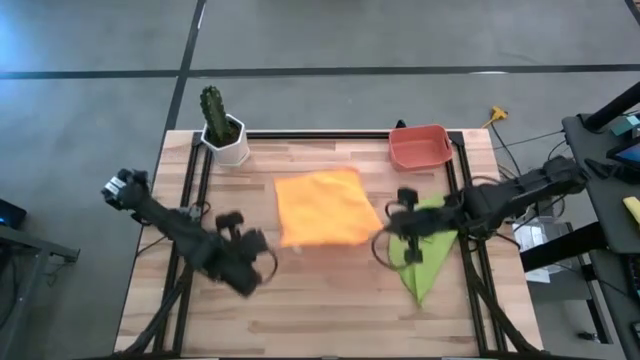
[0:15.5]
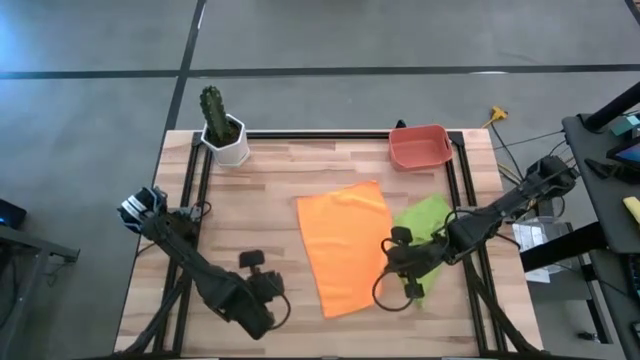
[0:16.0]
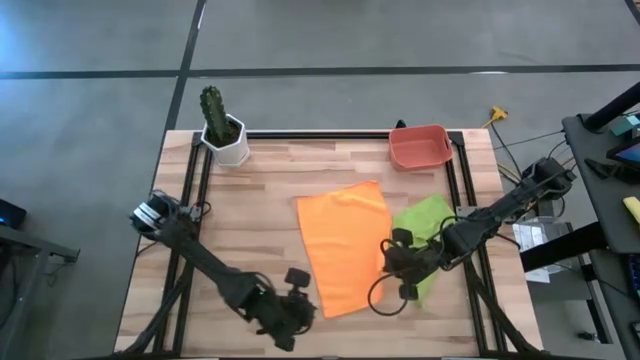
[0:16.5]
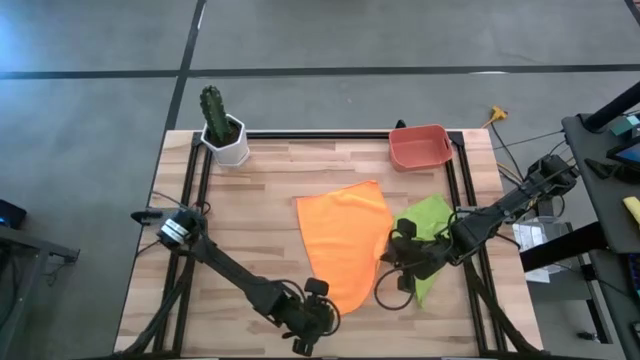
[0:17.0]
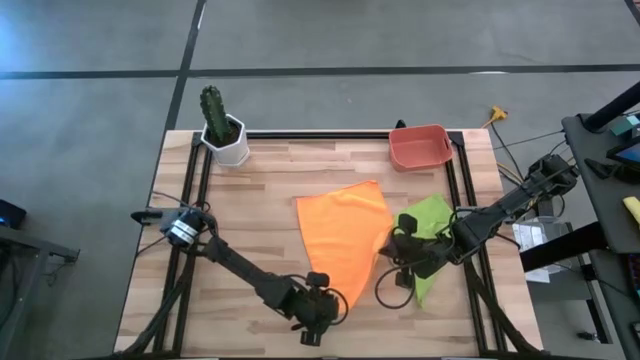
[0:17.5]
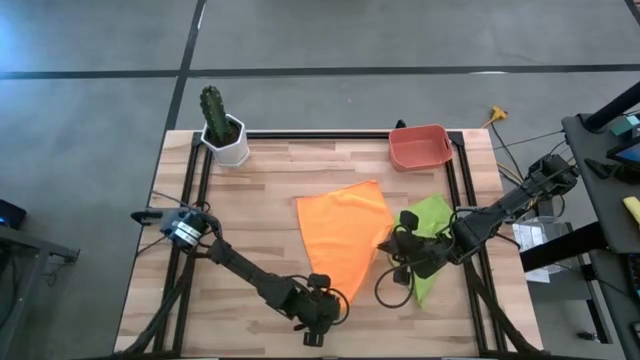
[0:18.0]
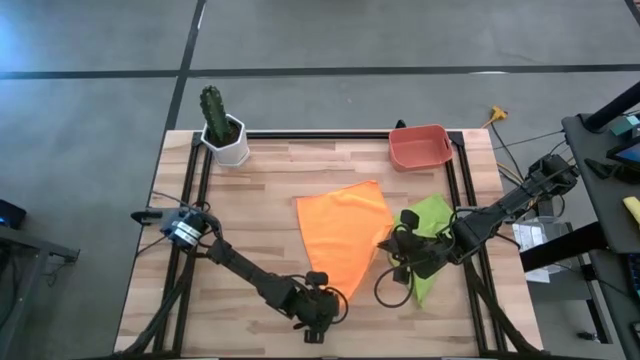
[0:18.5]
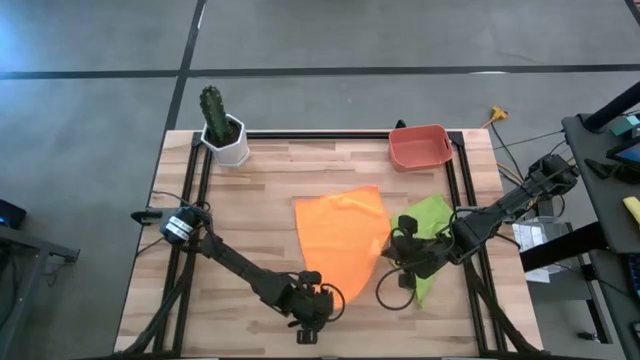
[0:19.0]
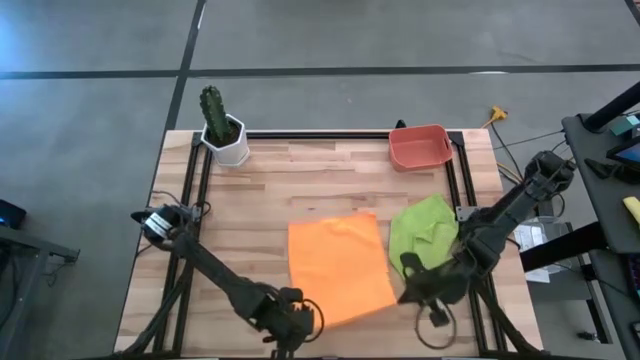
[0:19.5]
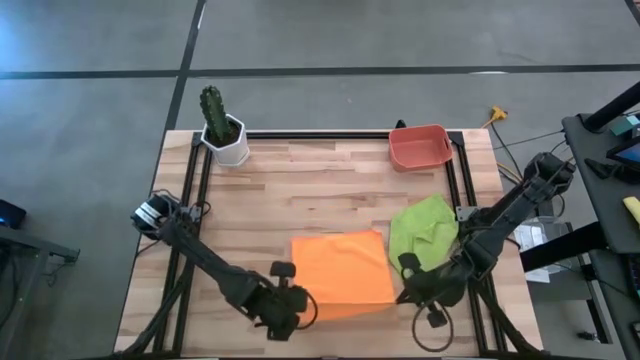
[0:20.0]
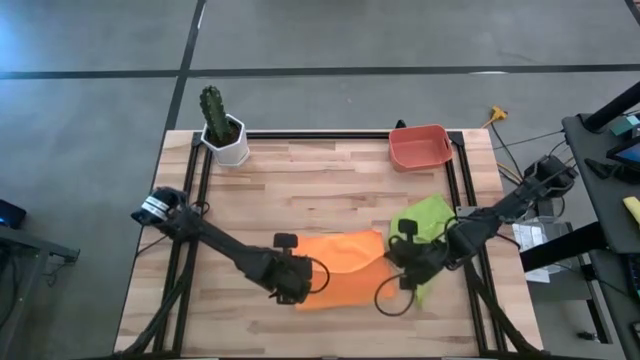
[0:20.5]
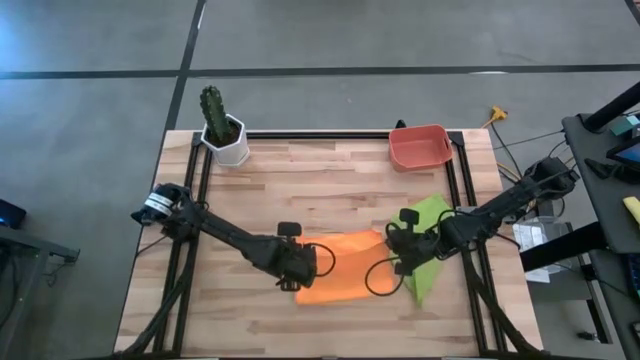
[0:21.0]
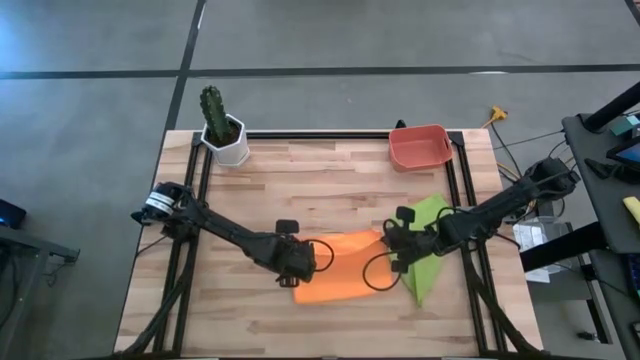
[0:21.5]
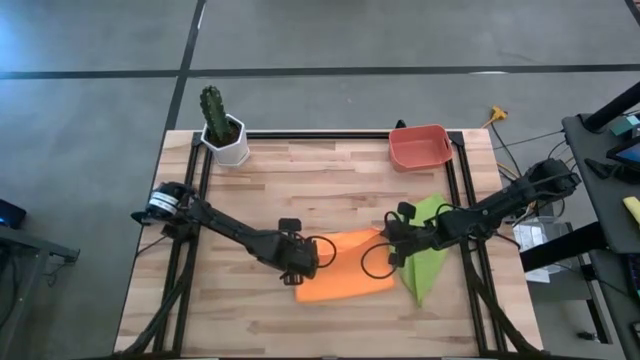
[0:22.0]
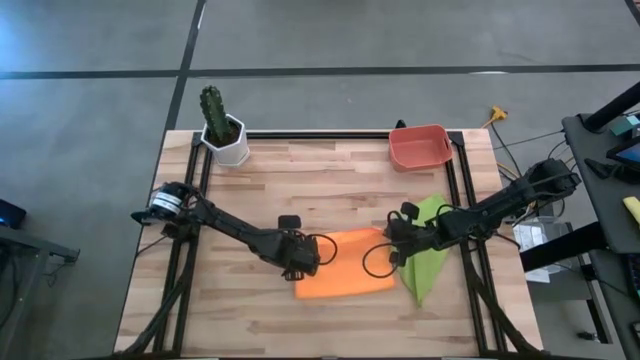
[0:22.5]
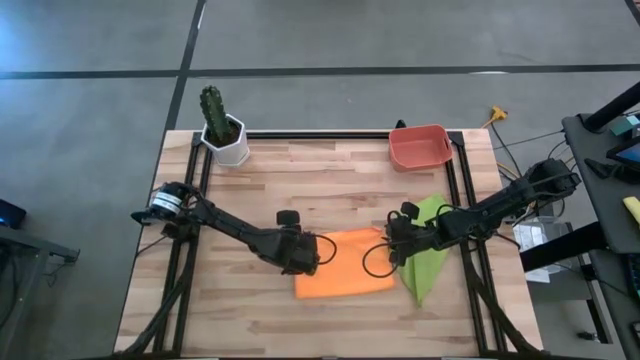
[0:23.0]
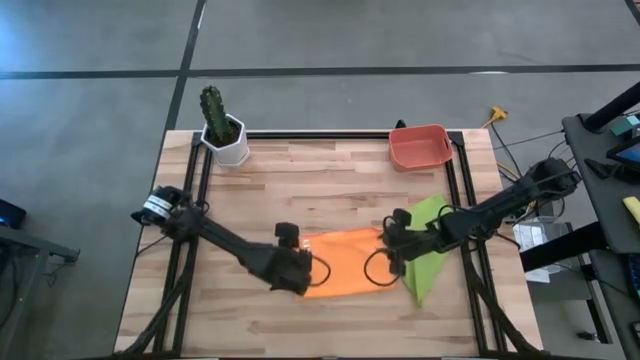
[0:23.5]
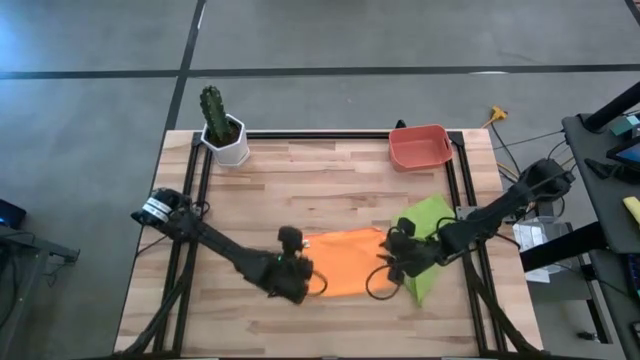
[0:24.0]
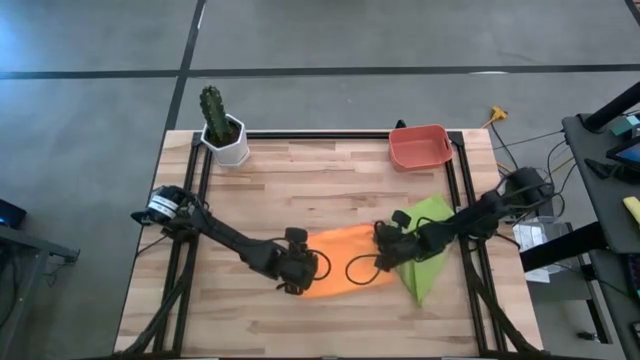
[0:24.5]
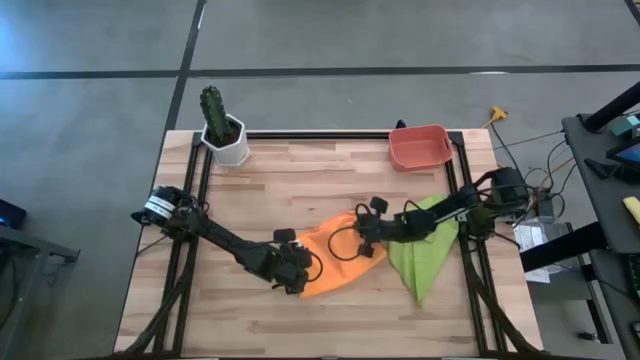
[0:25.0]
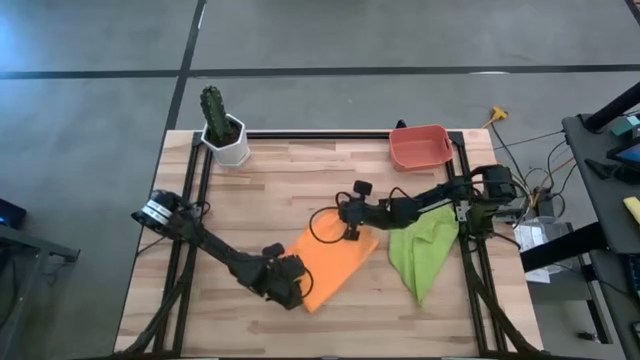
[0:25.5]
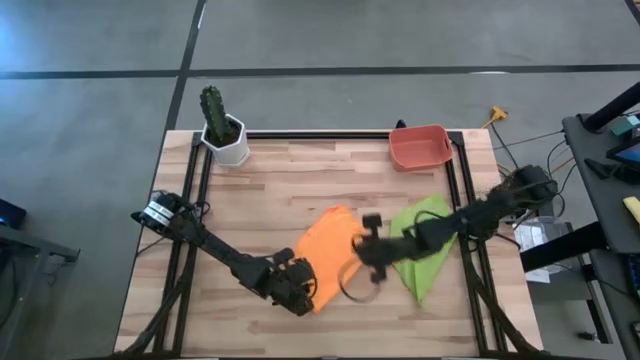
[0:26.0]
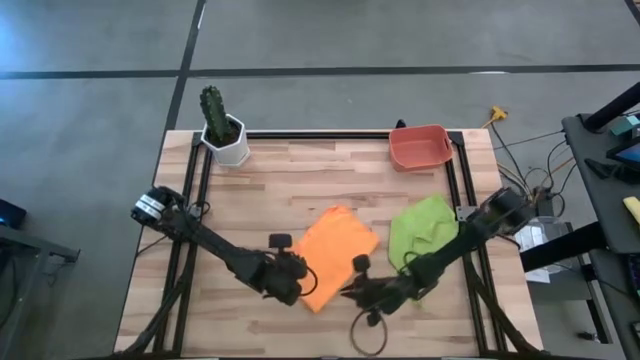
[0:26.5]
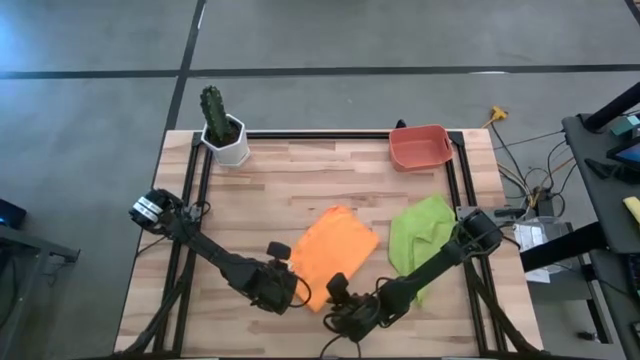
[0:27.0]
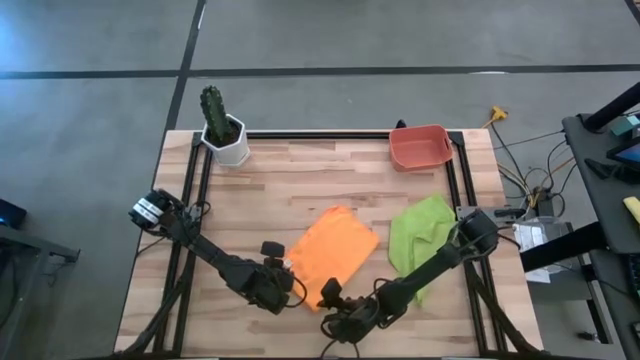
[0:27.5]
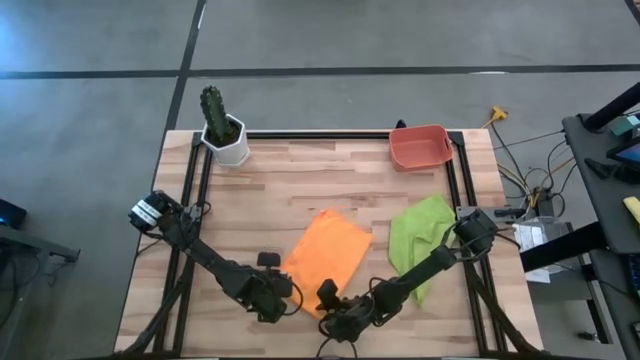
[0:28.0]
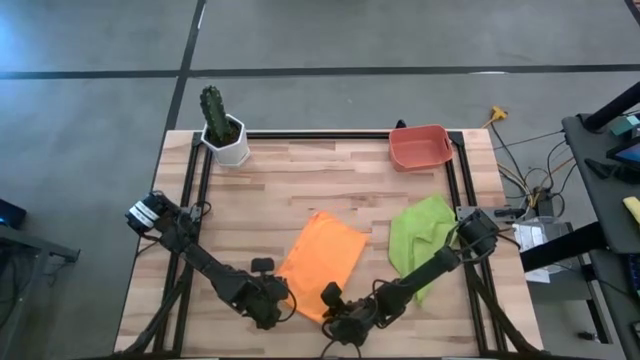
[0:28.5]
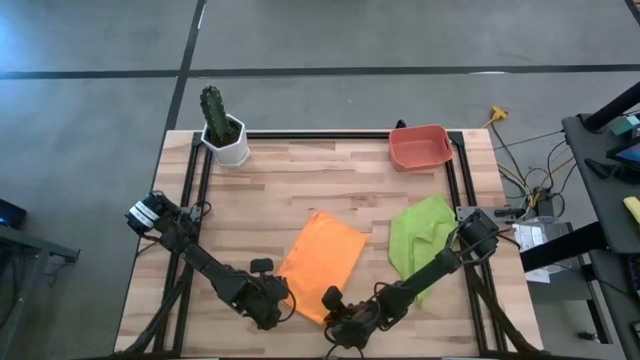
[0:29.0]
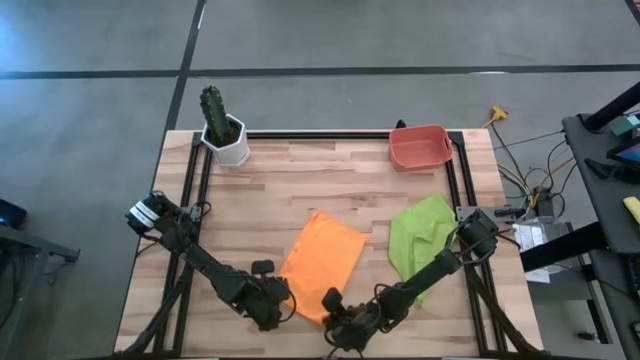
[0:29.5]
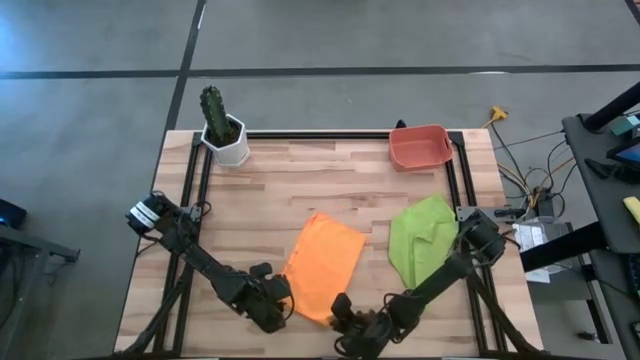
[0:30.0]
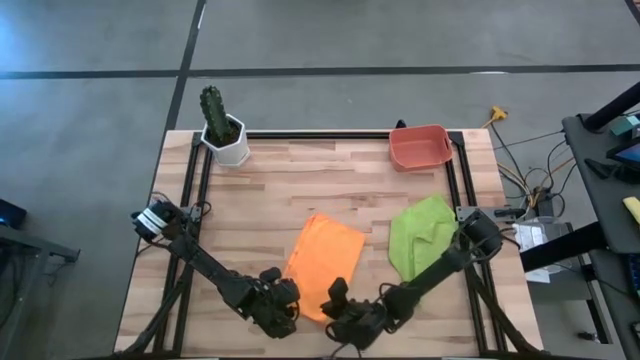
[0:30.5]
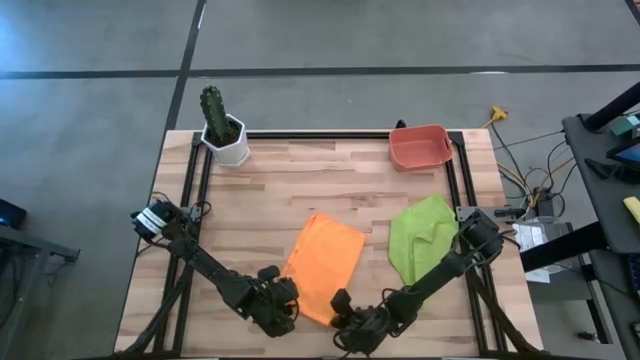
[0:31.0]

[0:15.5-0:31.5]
Task: Roll microfiber towels into tight, uniform cylinder then place into a basket
Fold the orange microfiber cloth

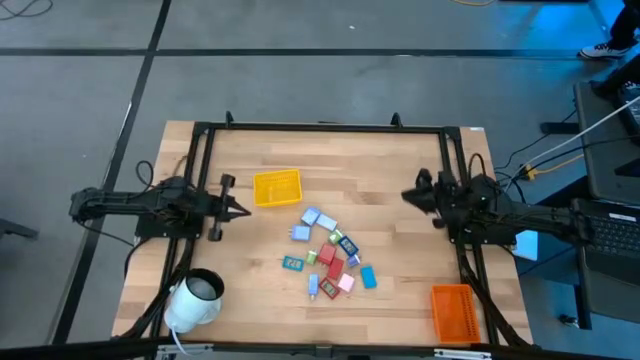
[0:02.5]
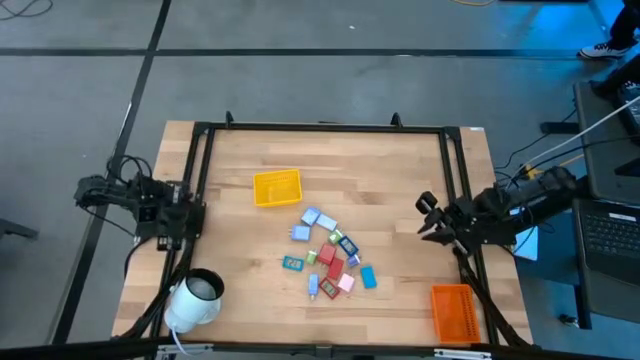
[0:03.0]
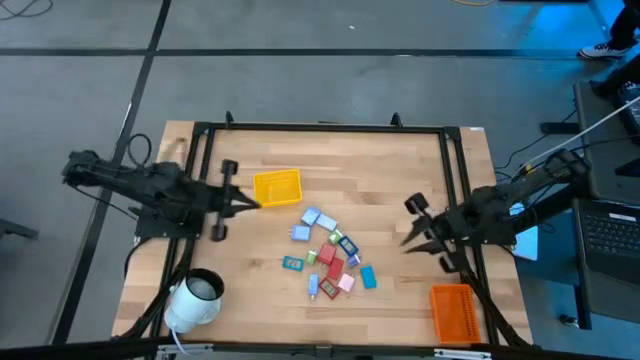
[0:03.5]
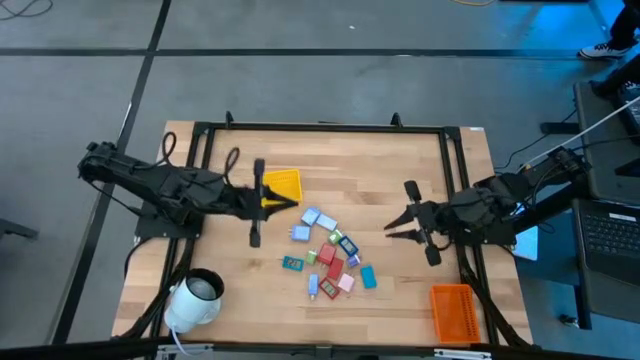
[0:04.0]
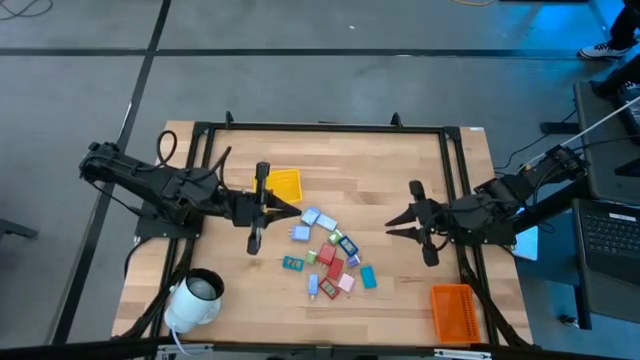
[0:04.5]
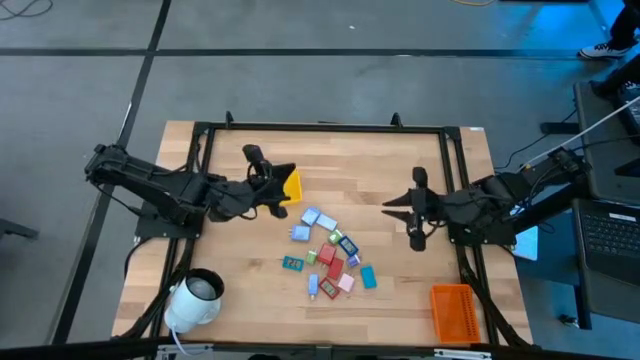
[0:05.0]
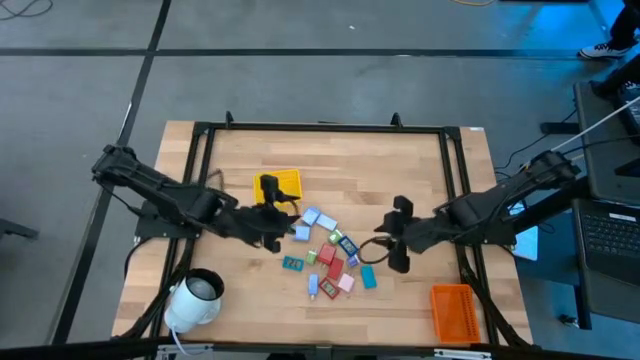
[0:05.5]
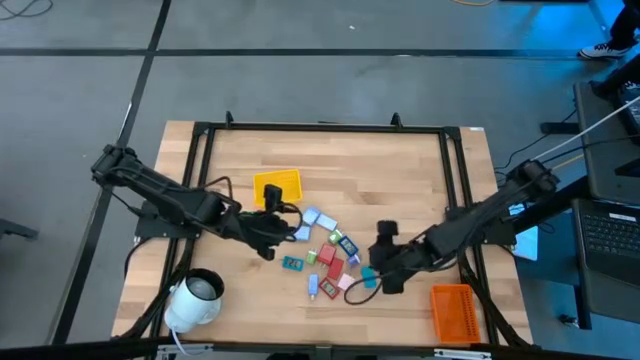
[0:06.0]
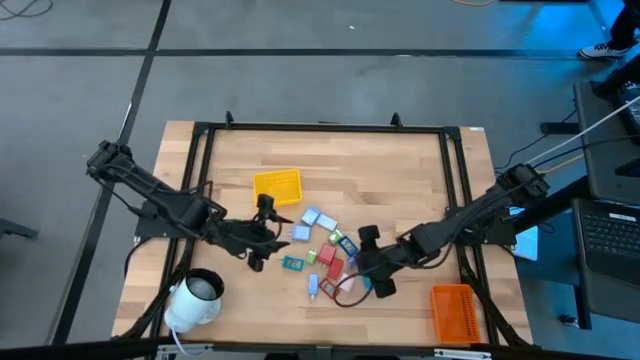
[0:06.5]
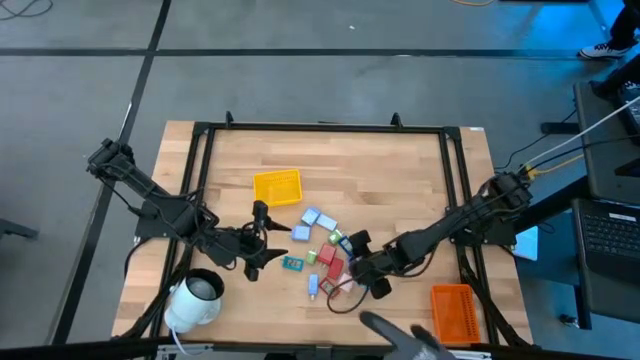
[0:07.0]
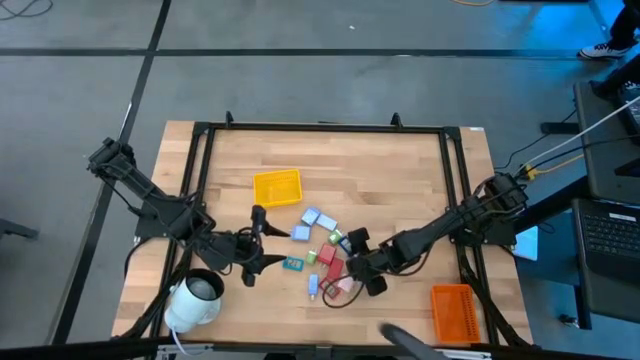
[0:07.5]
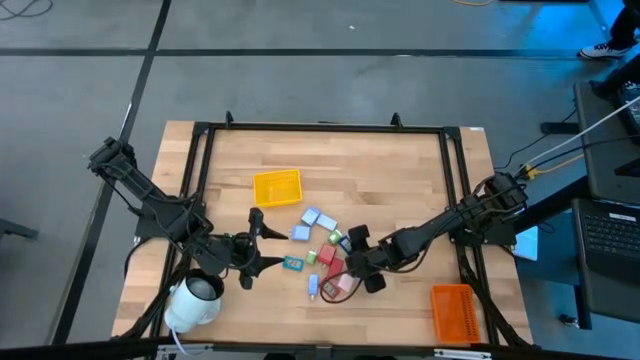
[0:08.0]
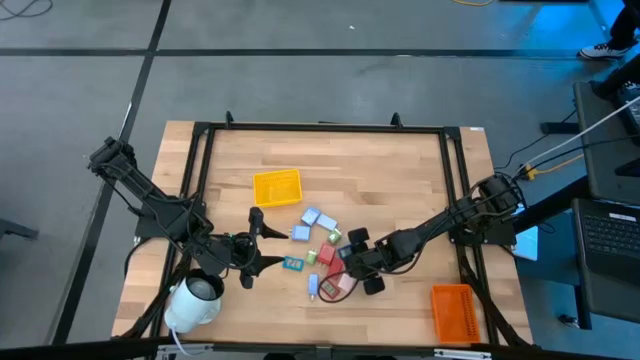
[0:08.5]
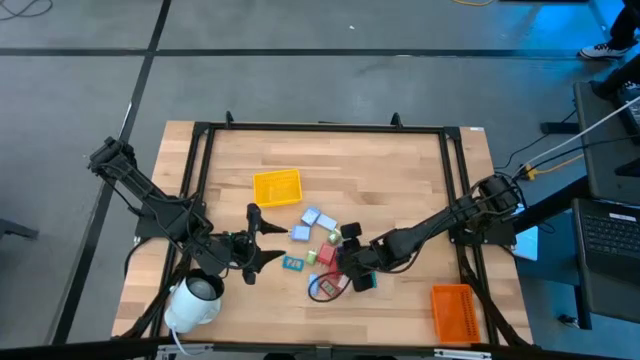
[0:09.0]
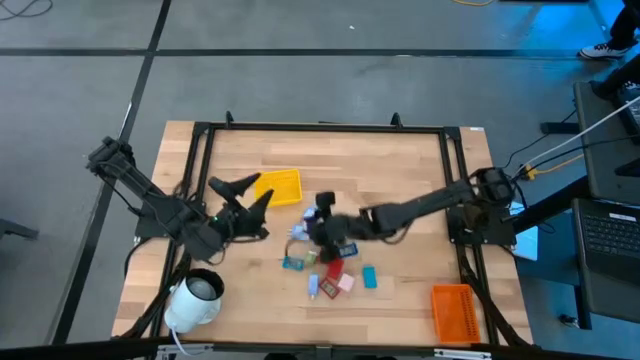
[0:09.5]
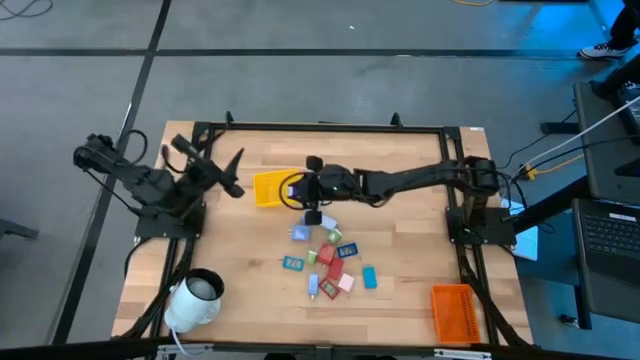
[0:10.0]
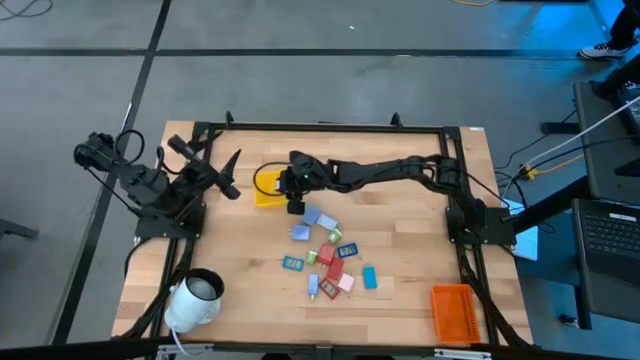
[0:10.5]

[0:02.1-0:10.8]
Task: Pick & Place Office items
Put the purple charger adapter into the yellow bin
